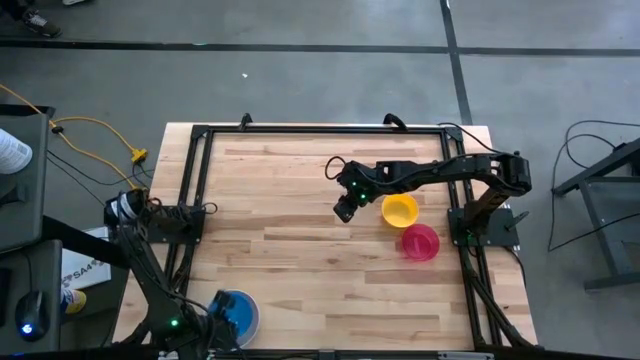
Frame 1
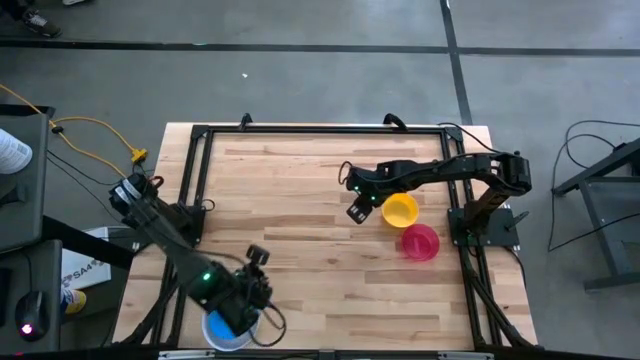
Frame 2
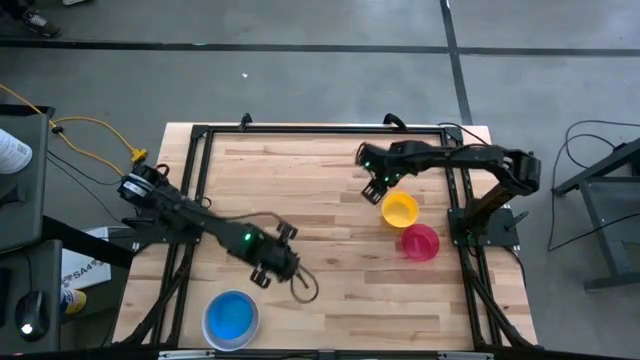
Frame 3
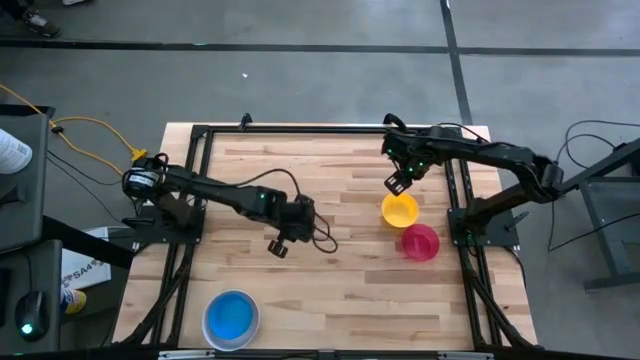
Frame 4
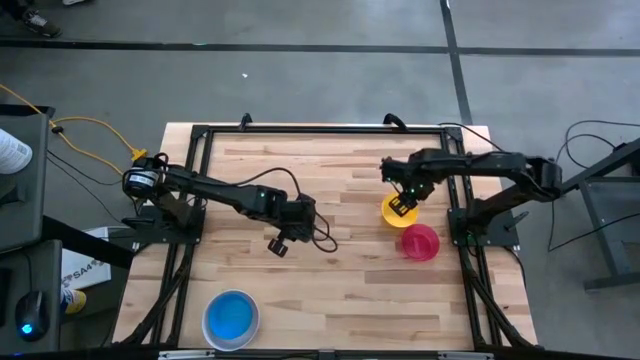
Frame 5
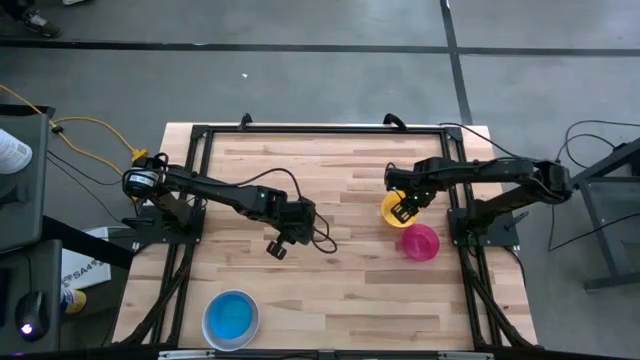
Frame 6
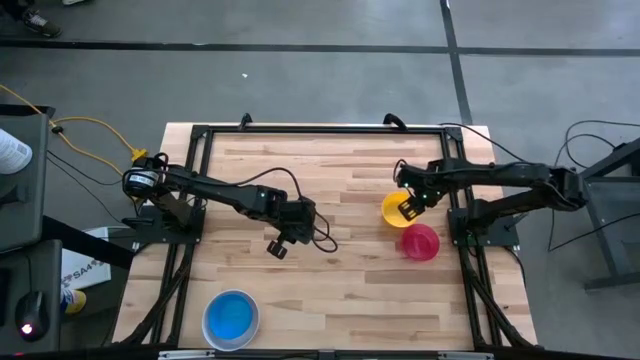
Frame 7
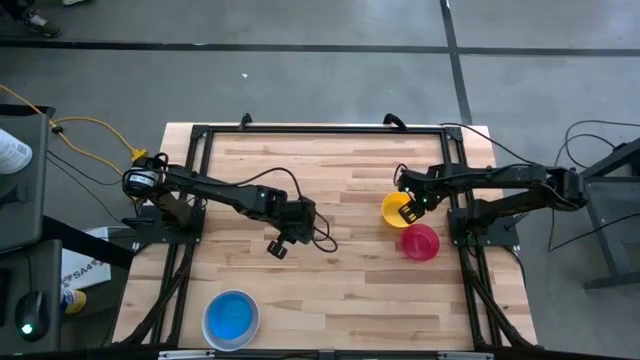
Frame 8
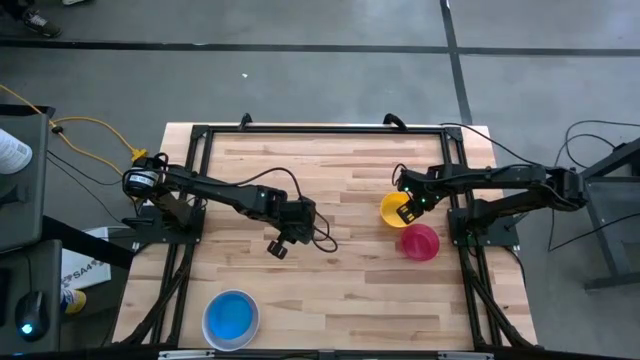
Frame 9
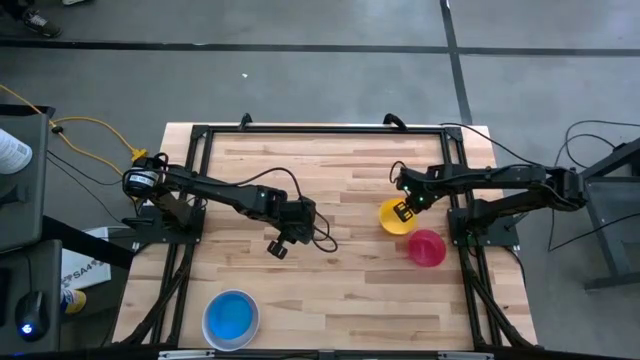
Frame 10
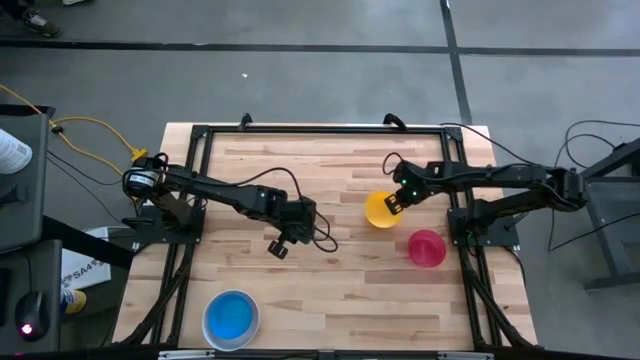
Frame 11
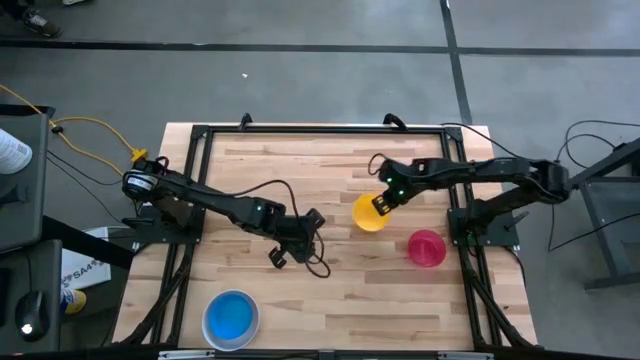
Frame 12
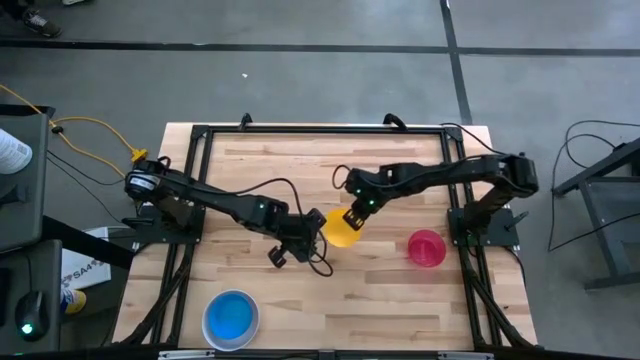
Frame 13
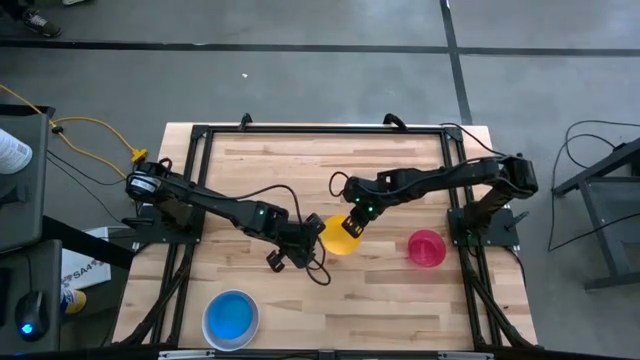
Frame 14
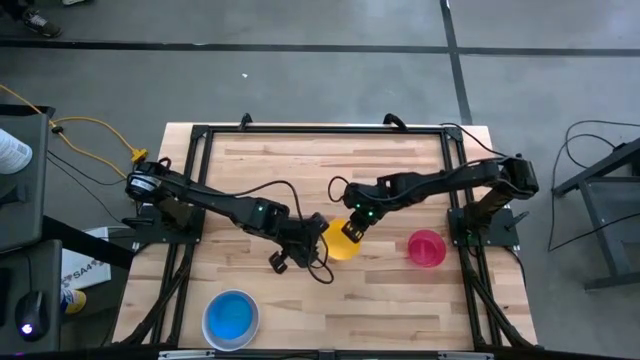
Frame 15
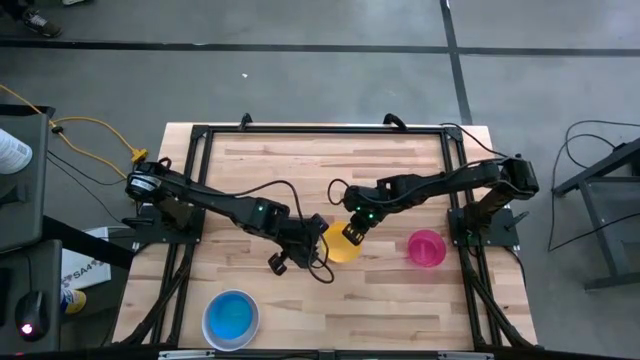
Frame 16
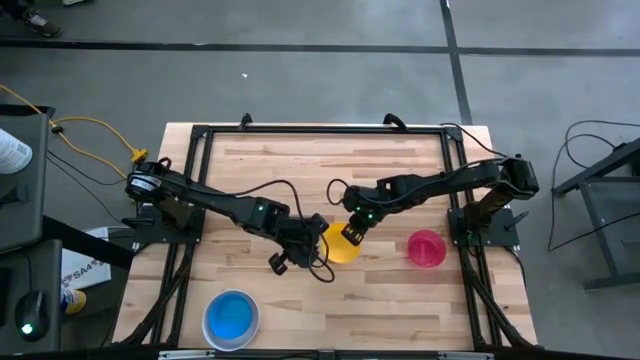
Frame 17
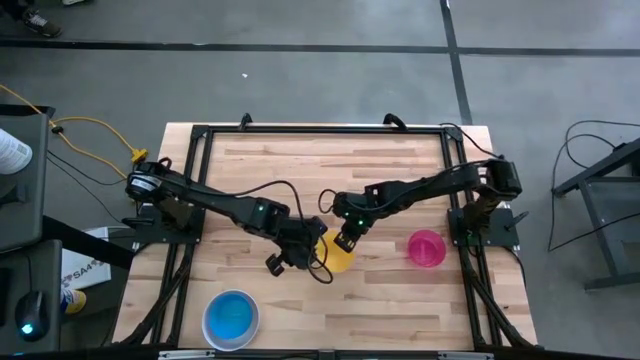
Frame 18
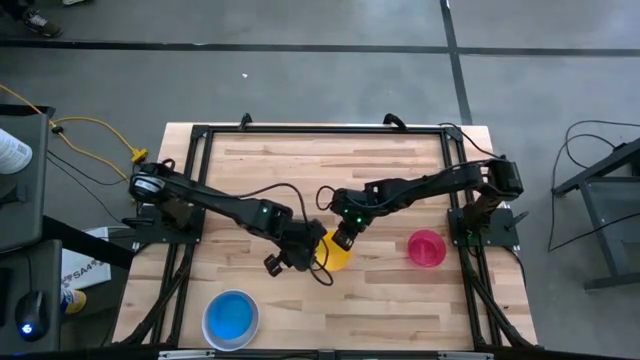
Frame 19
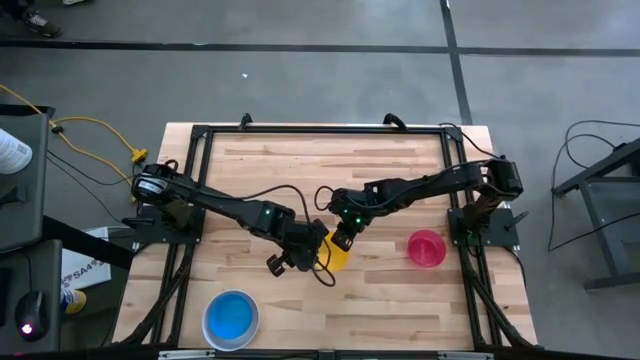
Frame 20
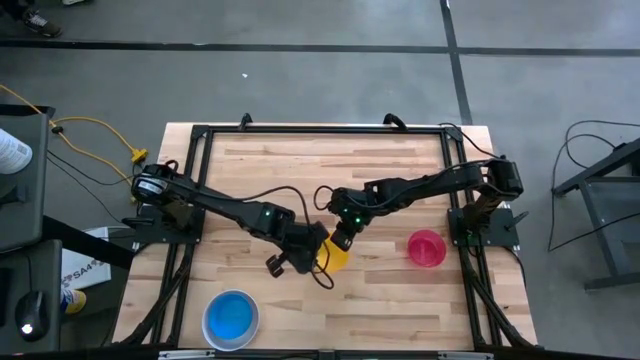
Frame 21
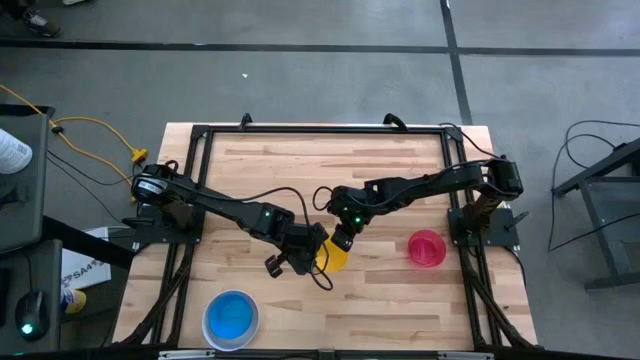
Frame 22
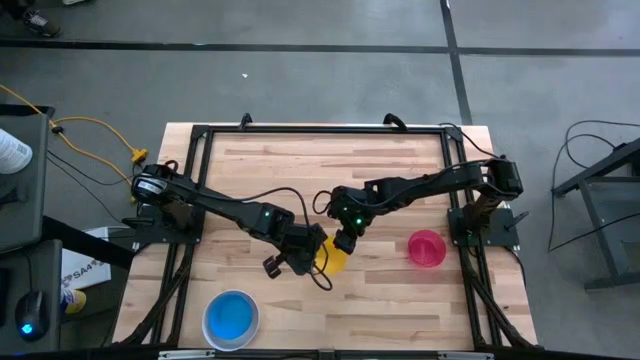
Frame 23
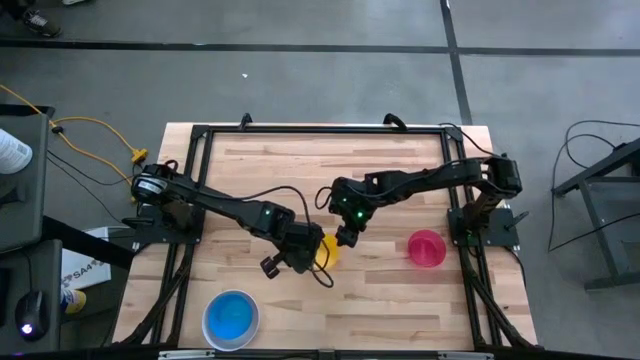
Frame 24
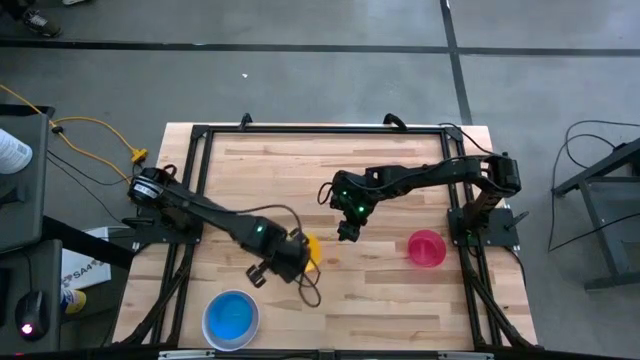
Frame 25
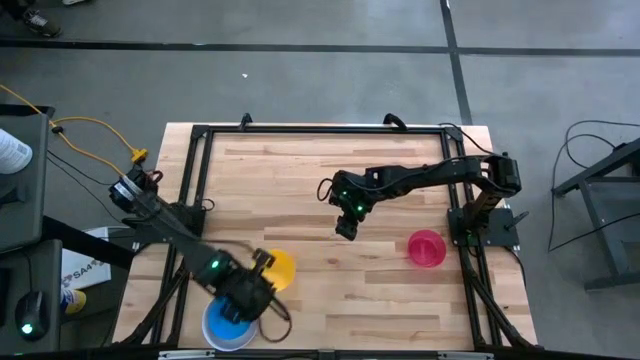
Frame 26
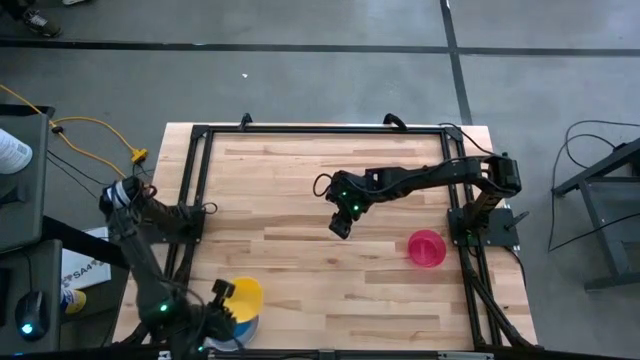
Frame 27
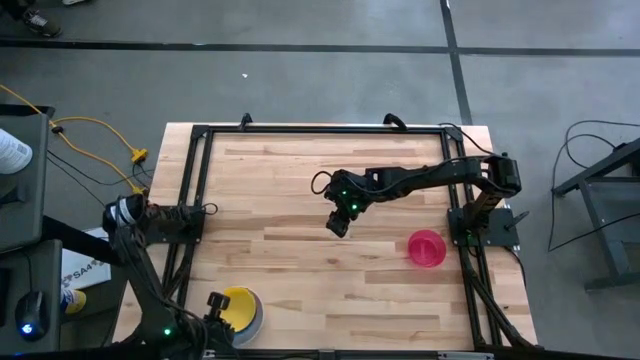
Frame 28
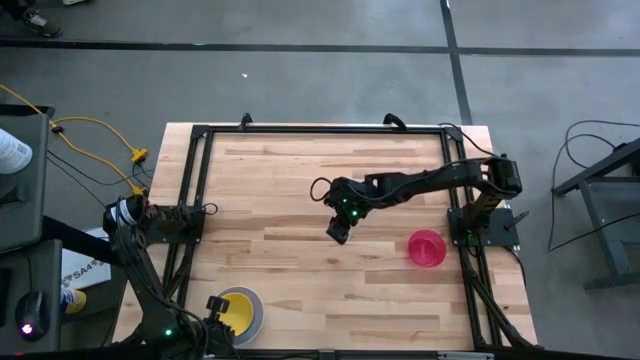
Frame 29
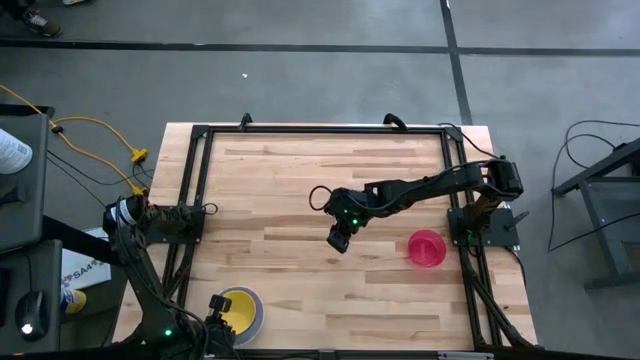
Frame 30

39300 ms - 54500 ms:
Stack the yellow bowl on the blue bowl

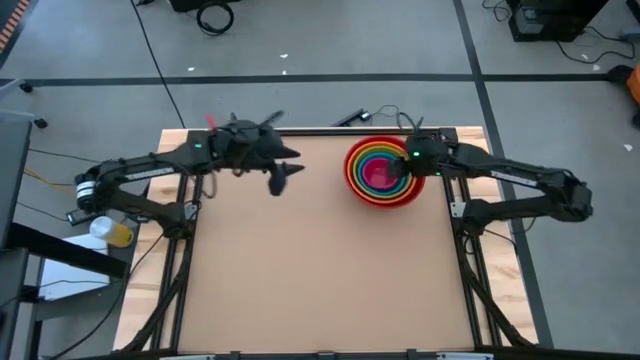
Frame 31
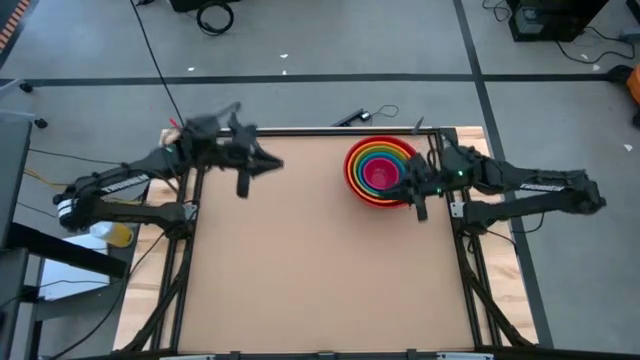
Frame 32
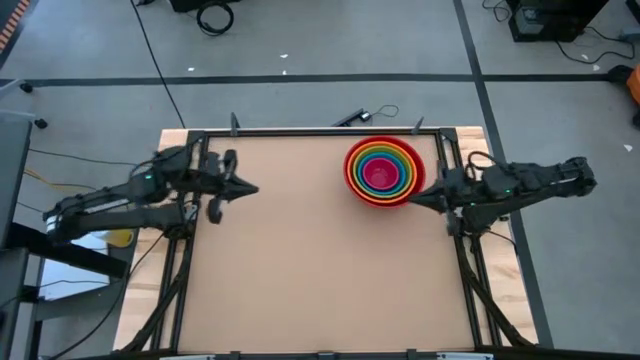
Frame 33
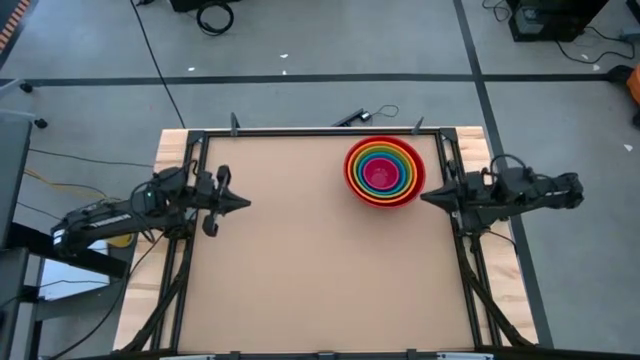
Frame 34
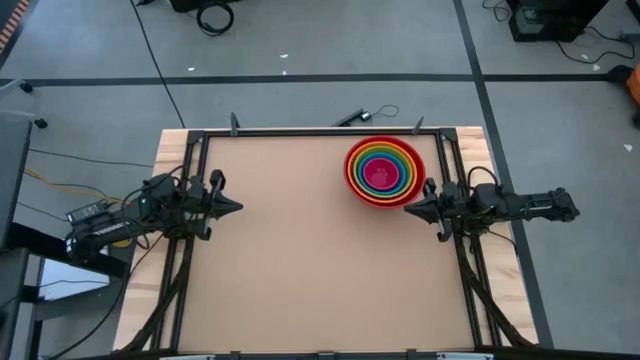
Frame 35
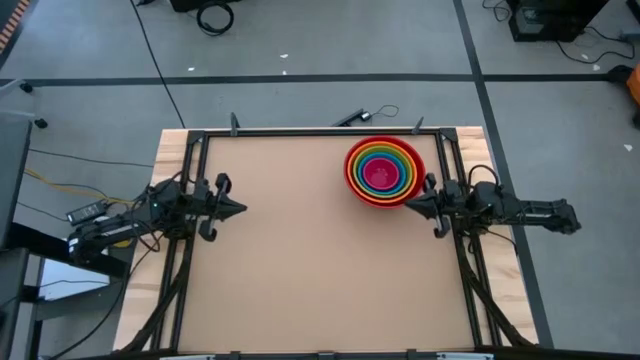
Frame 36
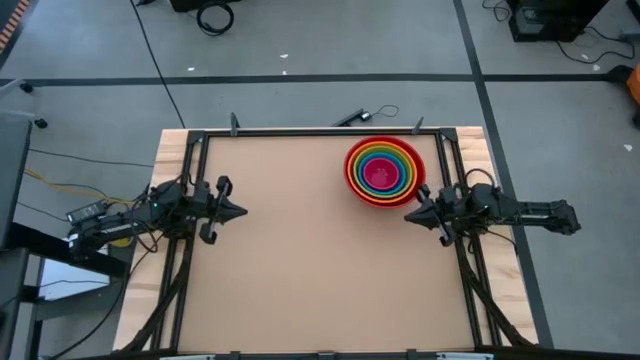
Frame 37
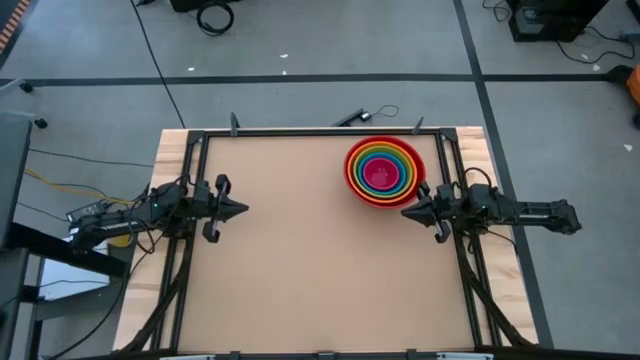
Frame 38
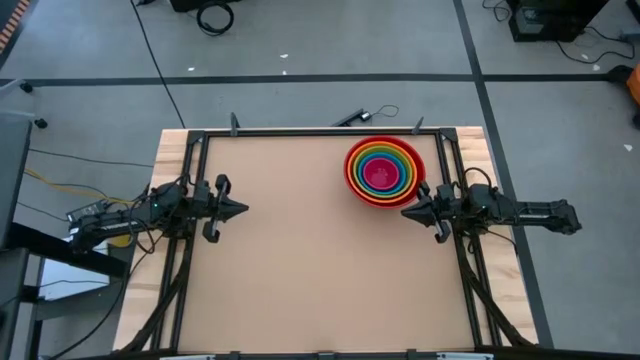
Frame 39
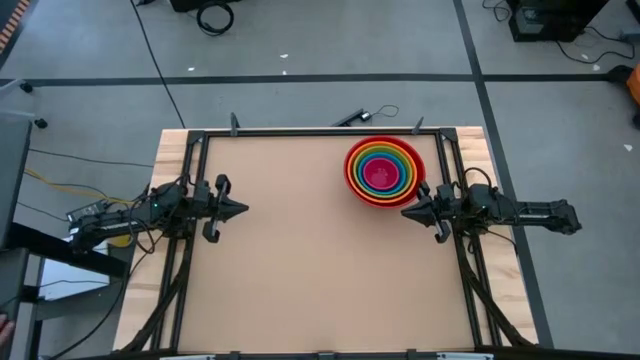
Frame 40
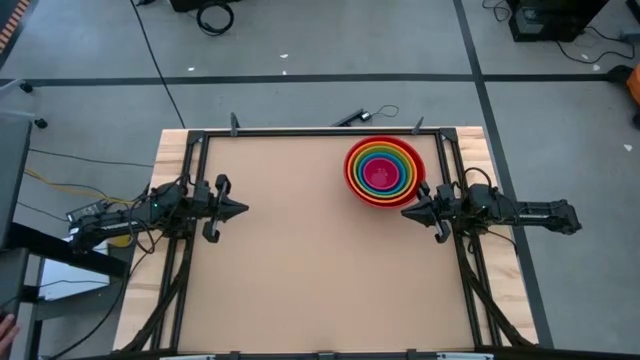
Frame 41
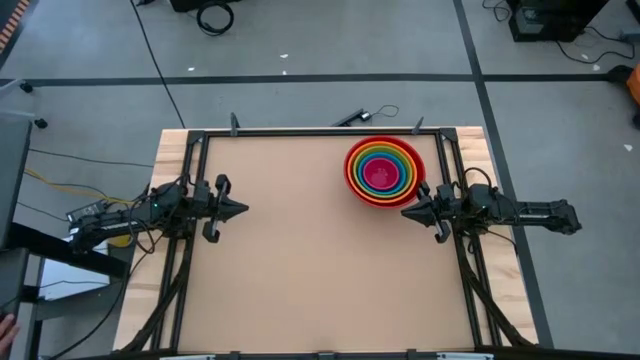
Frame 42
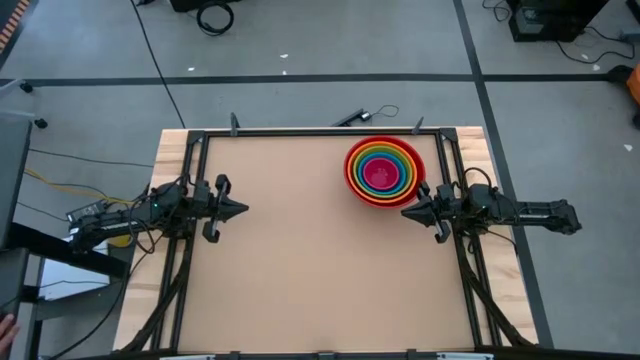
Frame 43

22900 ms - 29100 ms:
Return to Home Position
